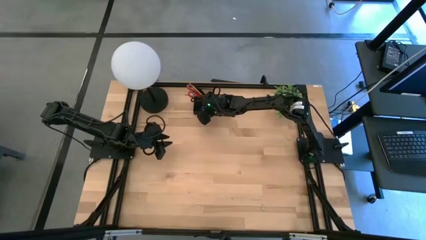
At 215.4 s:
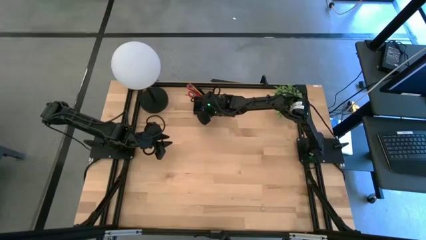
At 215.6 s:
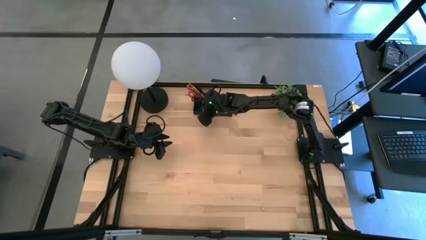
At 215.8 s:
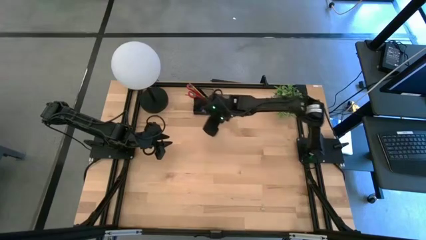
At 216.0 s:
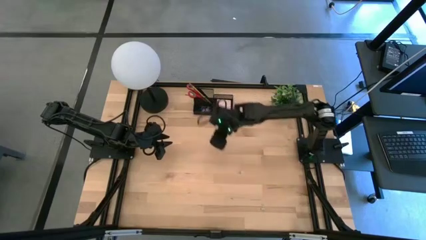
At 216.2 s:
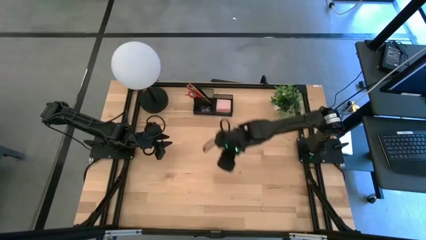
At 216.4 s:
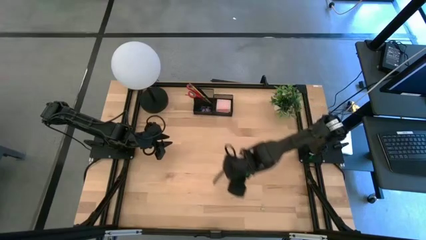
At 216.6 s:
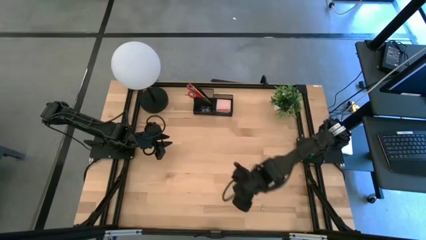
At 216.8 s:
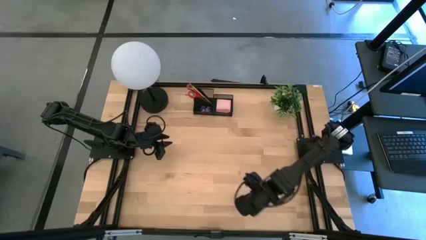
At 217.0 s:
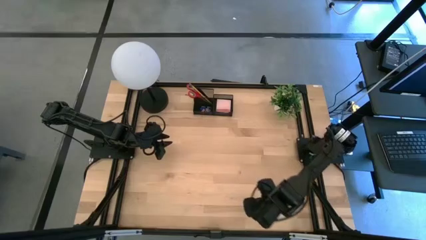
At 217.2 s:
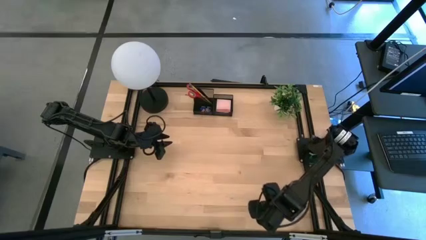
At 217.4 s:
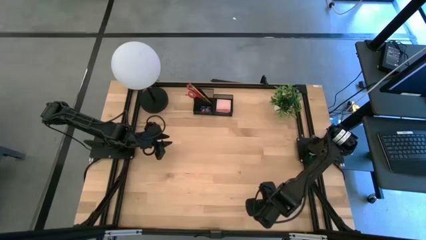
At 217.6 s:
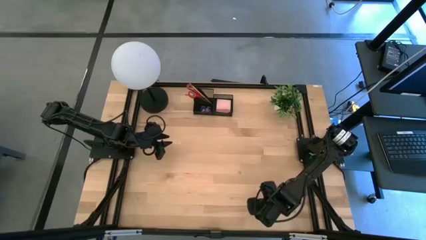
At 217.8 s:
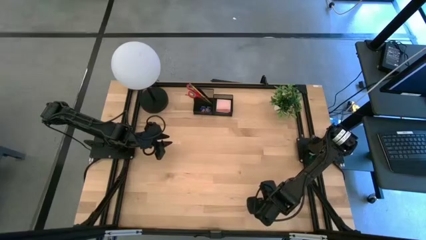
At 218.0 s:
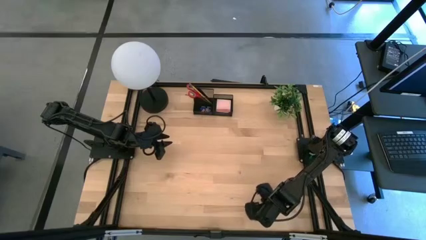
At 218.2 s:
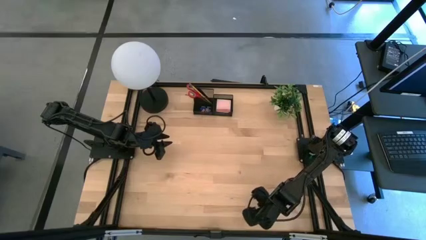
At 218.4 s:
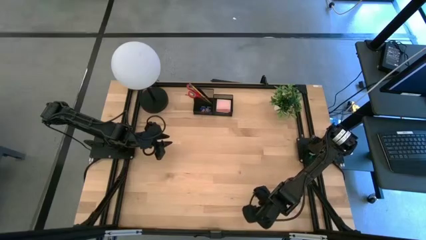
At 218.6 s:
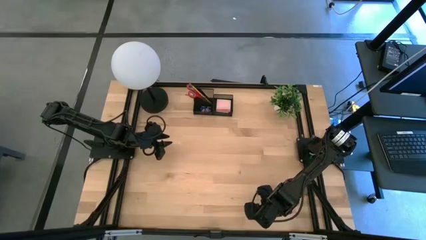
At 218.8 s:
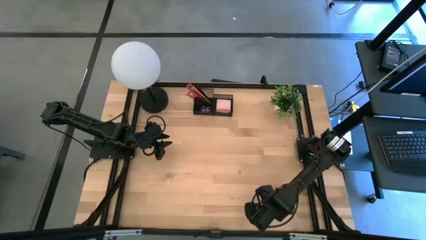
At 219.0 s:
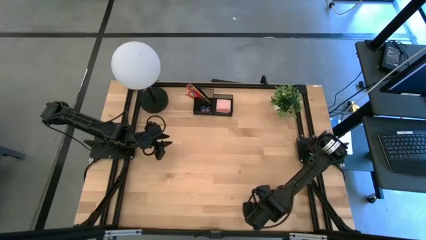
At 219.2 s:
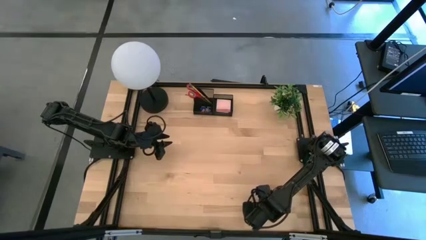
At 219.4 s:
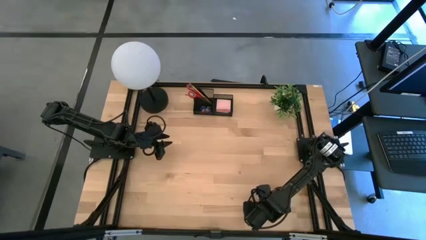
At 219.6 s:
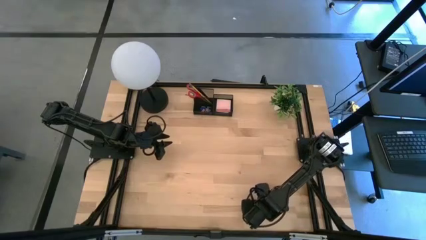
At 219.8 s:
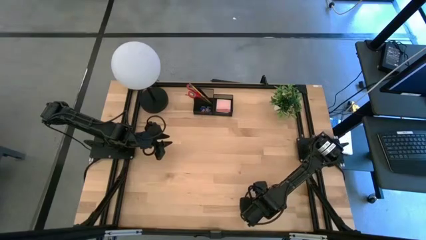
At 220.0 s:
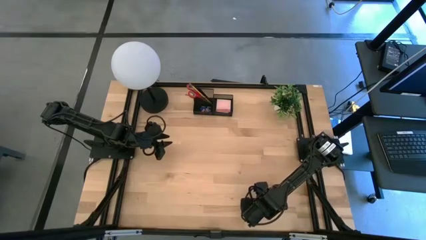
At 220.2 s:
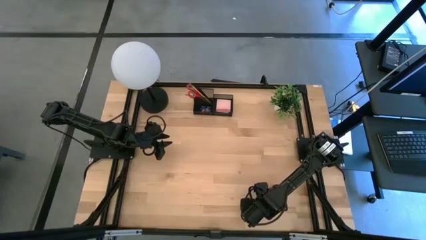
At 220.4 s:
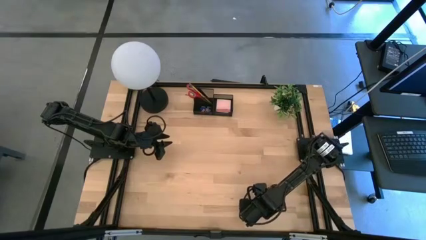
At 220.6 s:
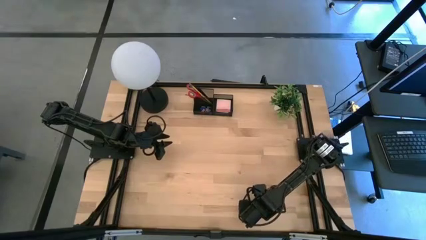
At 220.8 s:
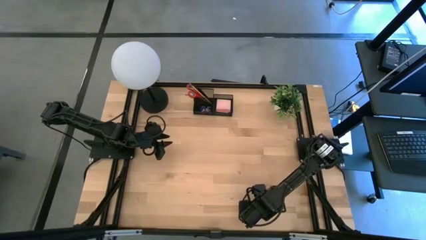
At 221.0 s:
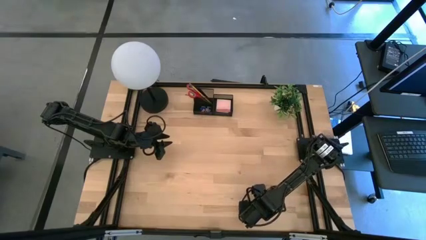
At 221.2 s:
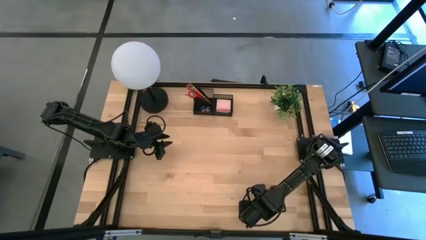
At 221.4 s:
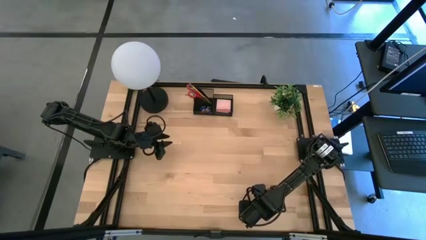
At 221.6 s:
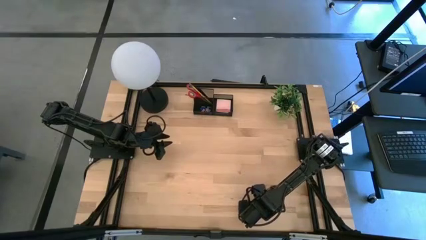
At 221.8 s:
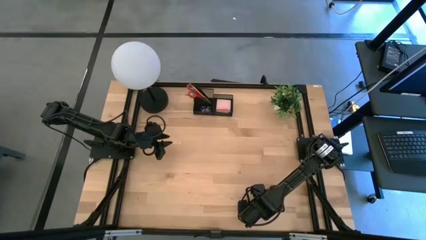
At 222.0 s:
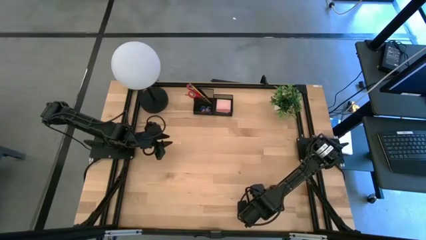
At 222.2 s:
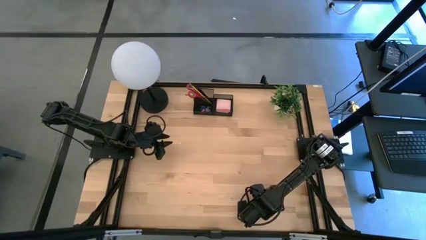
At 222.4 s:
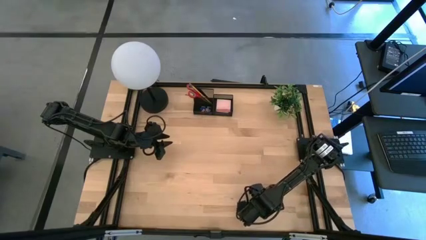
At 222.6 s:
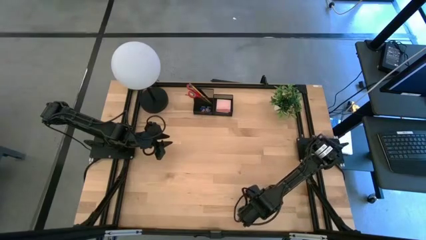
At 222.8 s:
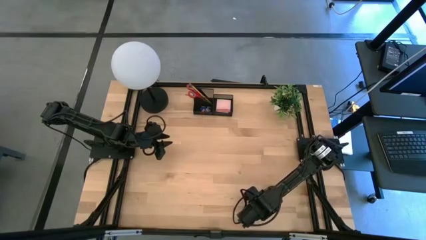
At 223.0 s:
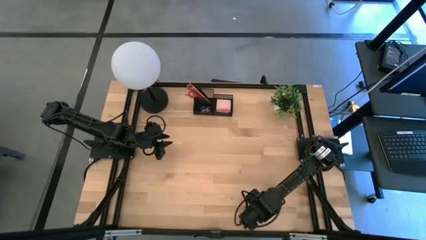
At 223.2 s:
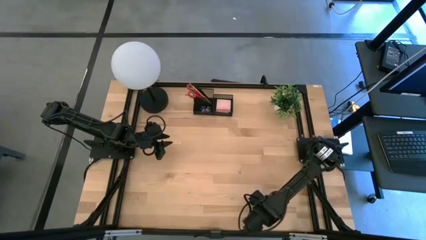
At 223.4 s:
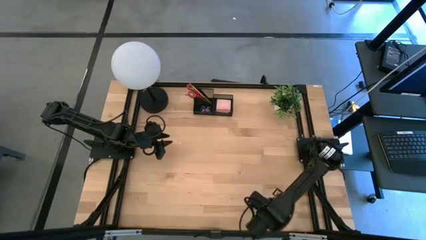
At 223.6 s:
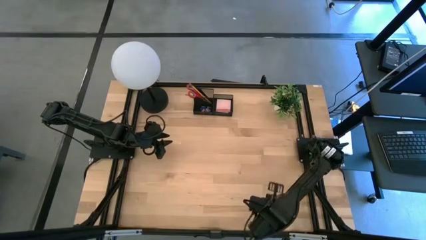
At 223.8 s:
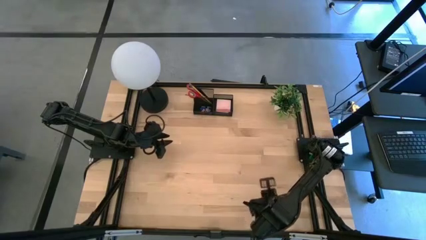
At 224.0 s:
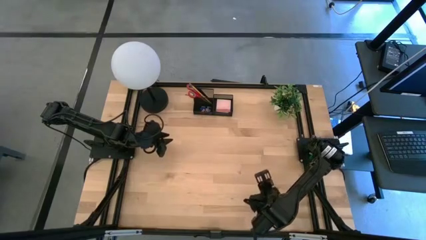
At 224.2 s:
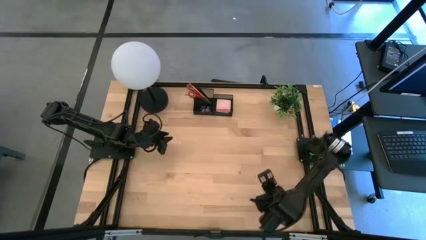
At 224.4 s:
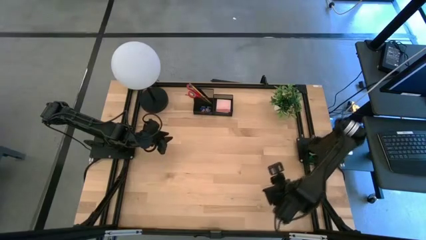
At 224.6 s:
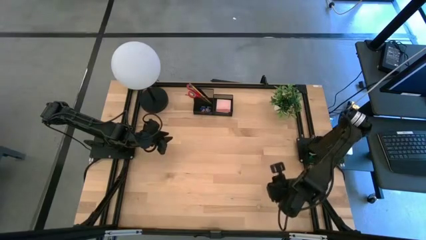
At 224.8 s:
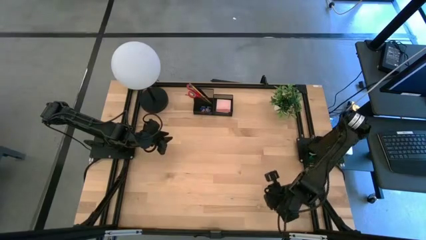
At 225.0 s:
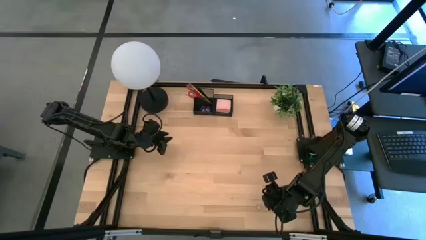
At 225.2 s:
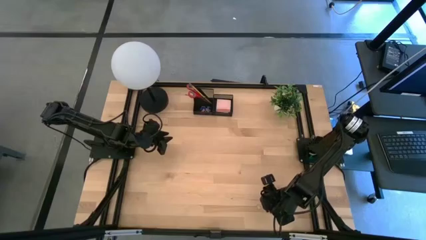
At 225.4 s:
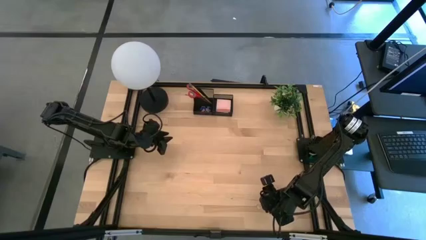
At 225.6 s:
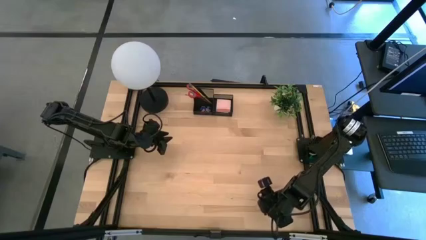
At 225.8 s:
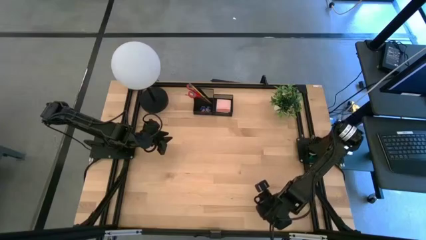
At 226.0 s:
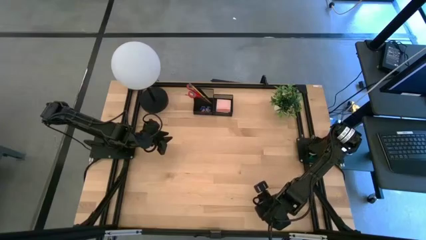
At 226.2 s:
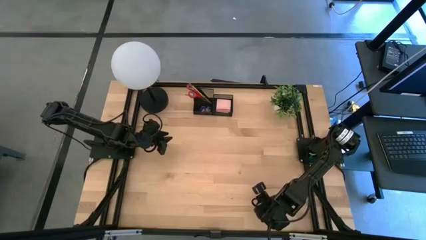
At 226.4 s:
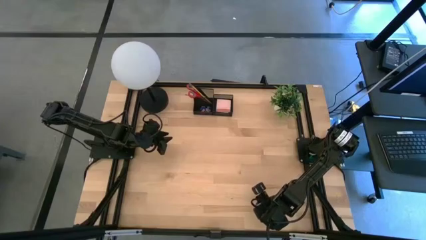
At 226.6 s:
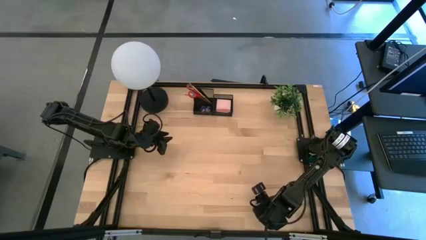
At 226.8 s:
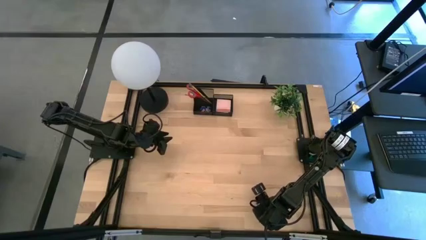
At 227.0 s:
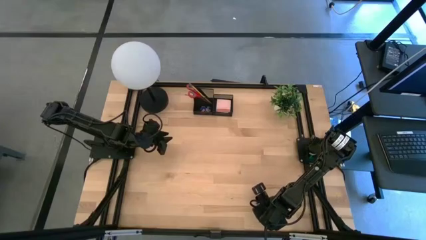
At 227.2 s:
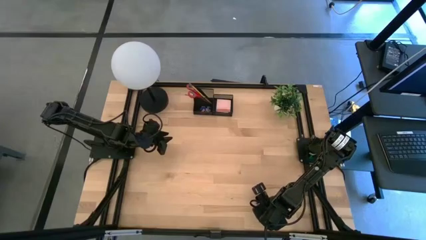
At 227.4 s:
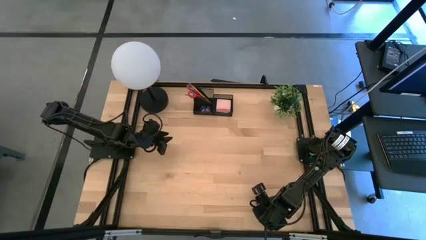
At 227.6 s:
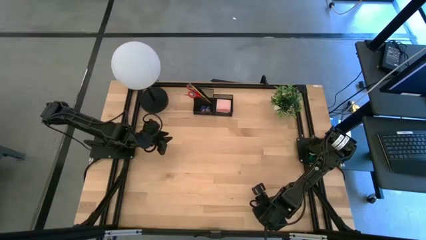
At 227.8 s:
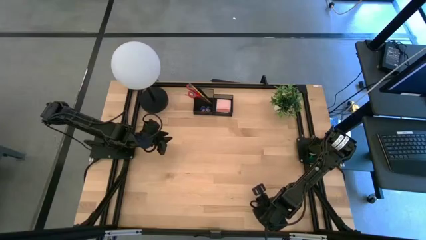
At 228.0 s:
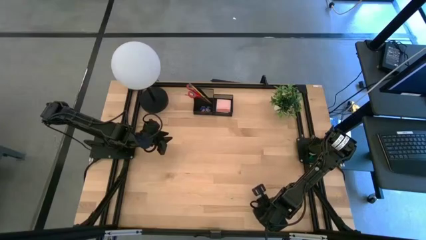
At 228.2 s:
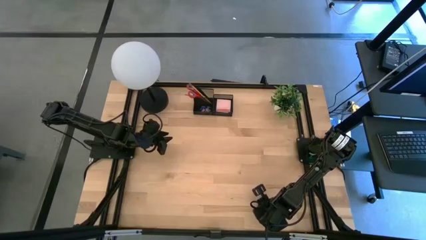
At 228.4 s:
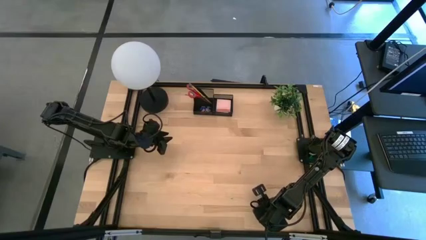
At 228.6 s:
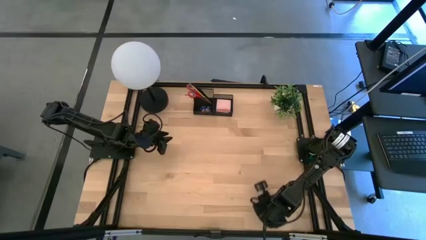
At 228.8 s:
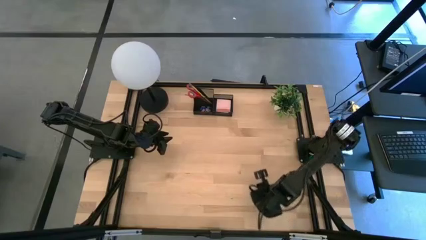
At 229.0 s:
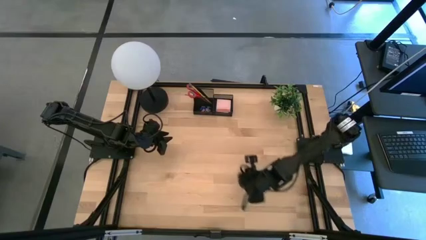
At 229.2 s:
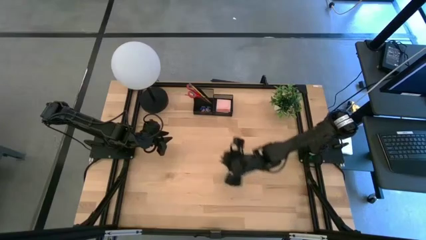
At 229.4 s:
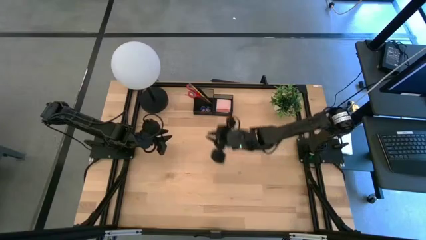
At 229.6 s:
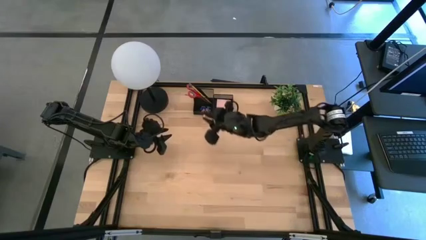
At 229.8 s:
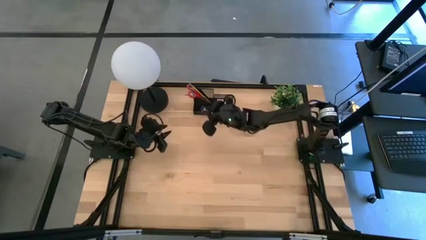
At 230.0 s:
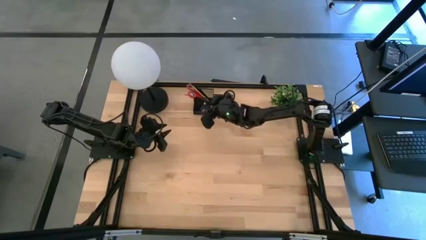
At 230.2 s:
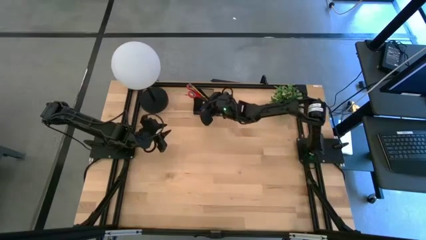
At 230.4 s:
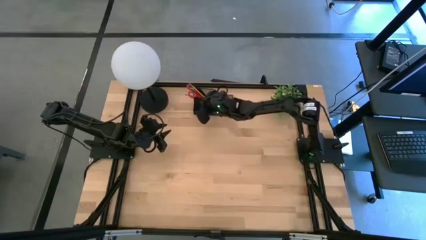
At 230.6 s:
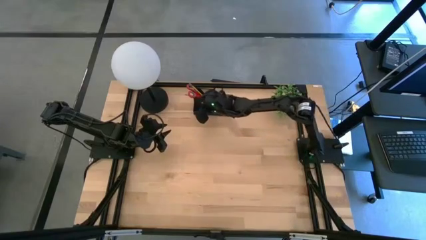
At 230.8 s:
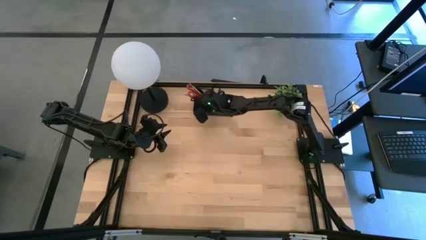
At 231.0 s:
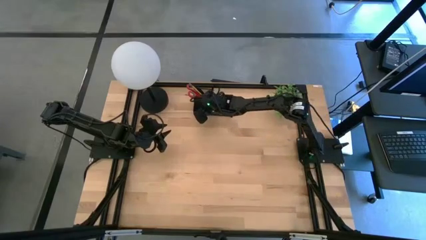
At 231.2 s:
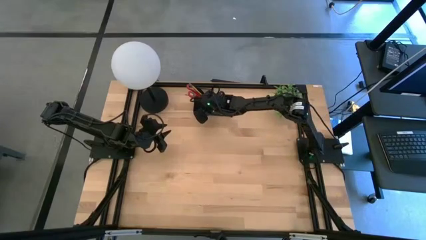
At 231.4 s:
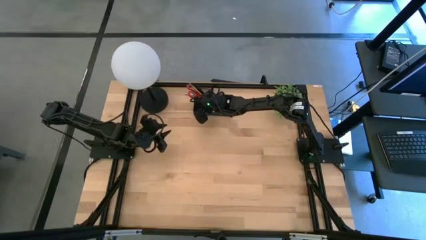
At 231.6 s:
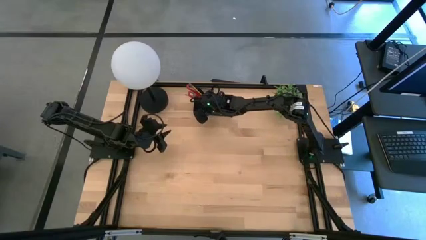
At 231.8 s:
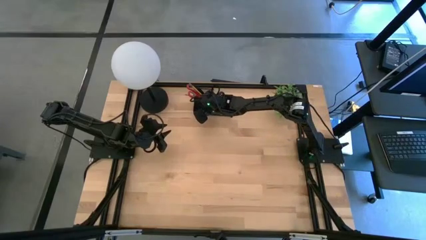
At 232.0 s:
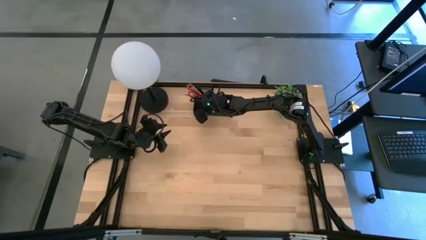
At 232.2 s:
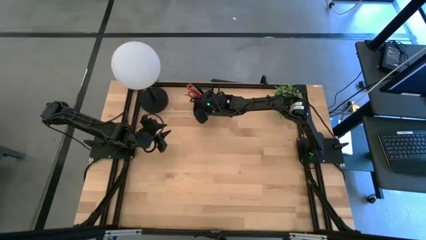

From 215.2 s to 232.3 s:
Task: Pick and place office supplies into organizer
Put the yellow binder clip into the black desk organizer
